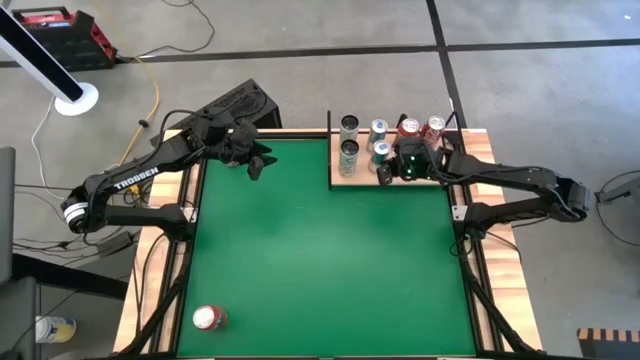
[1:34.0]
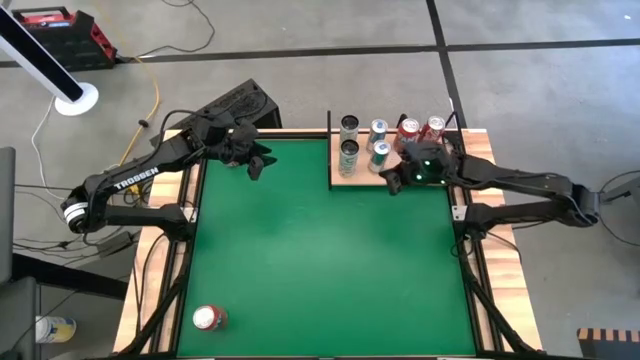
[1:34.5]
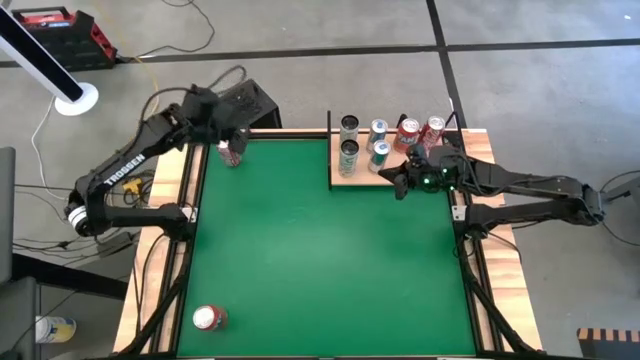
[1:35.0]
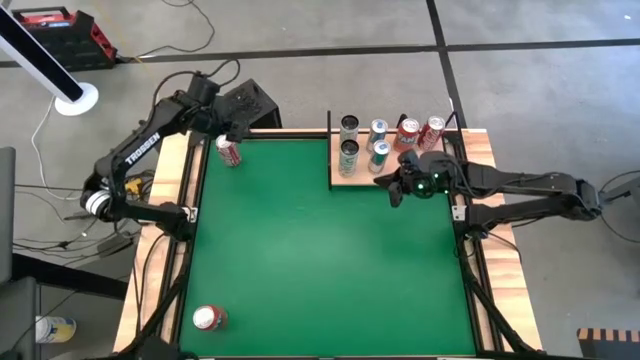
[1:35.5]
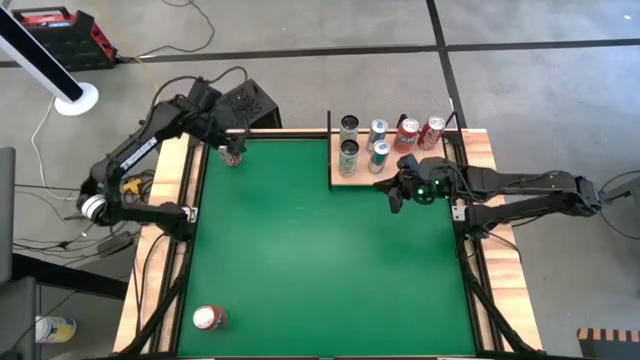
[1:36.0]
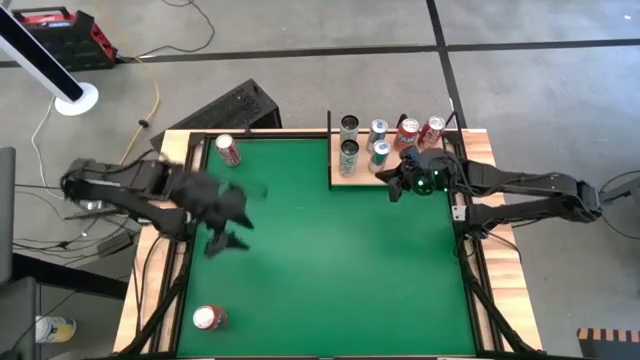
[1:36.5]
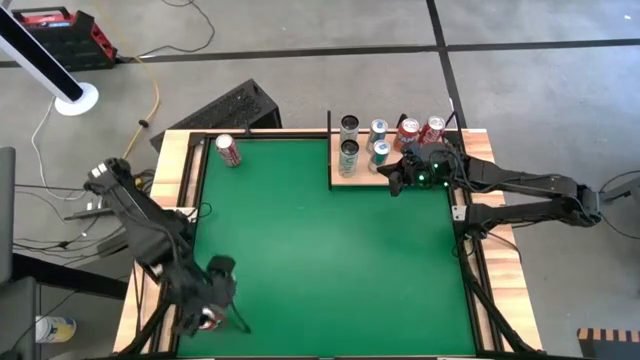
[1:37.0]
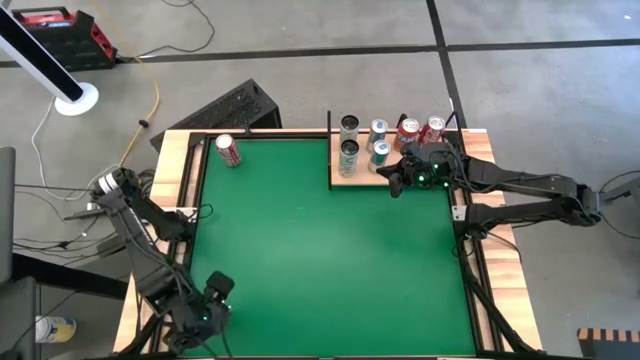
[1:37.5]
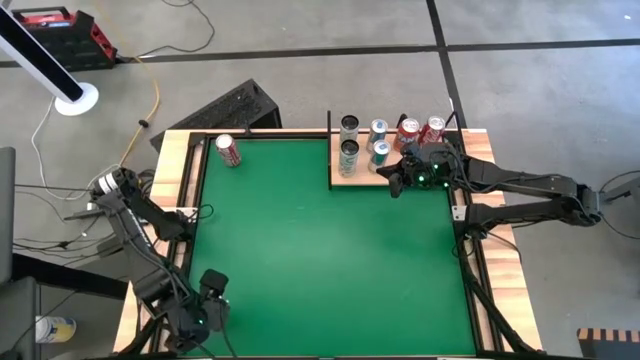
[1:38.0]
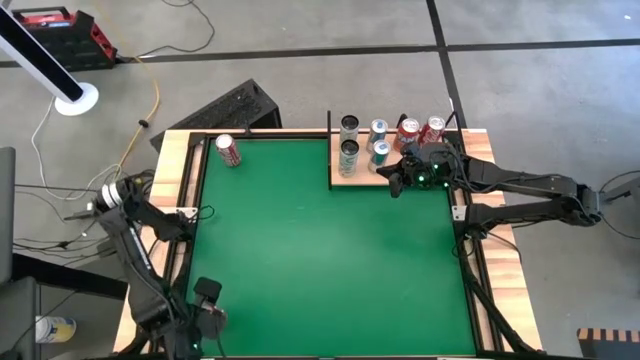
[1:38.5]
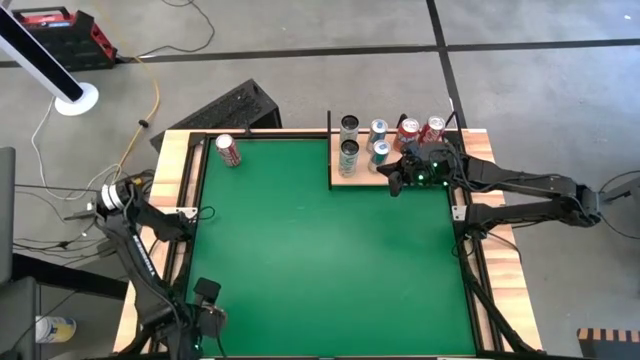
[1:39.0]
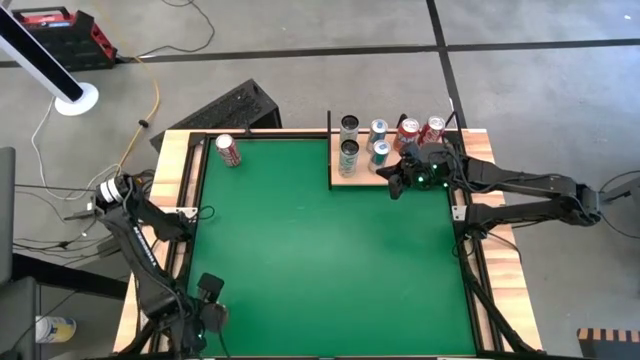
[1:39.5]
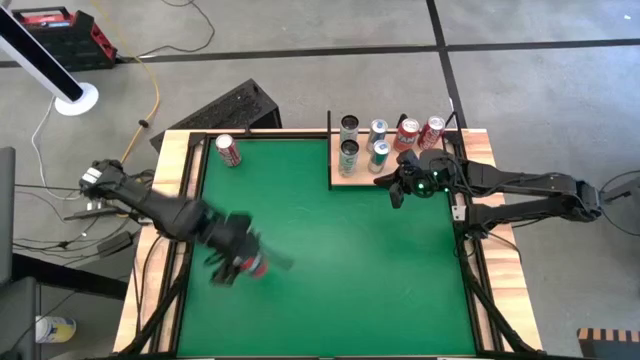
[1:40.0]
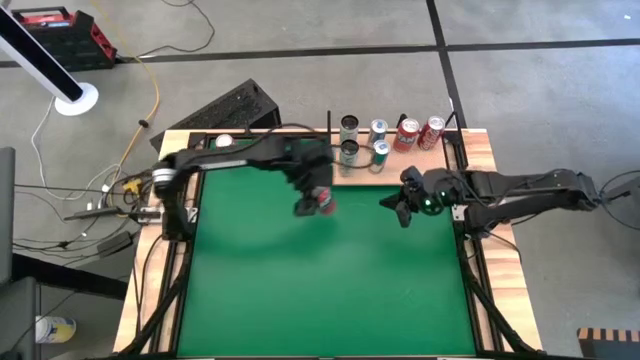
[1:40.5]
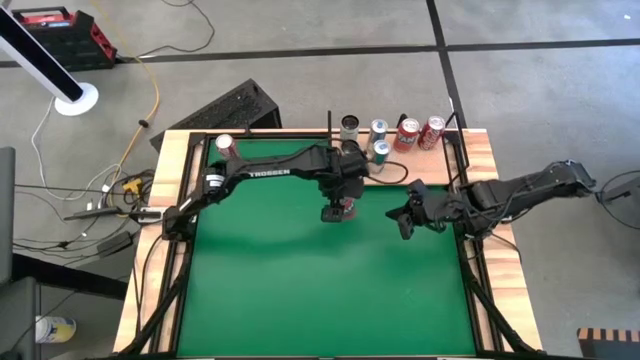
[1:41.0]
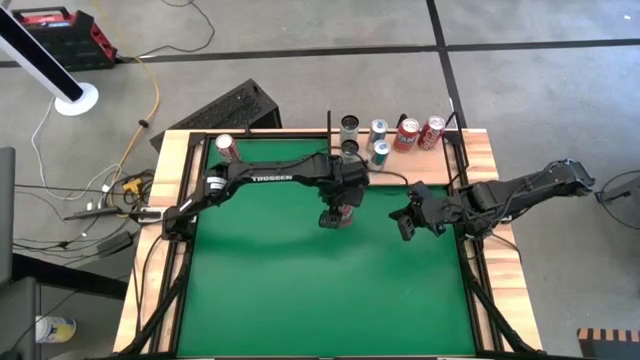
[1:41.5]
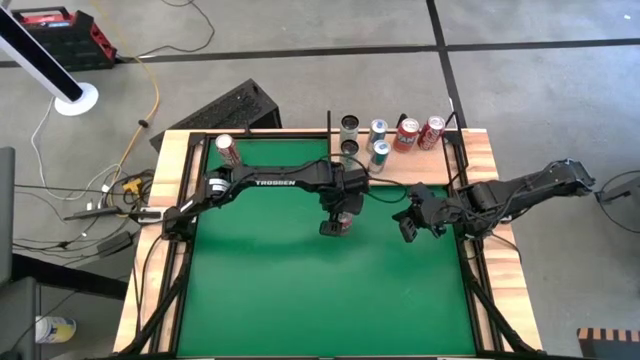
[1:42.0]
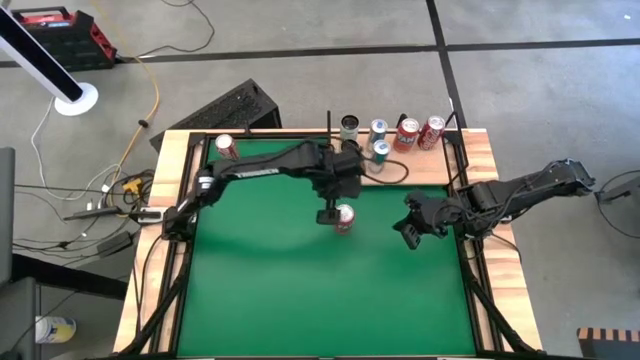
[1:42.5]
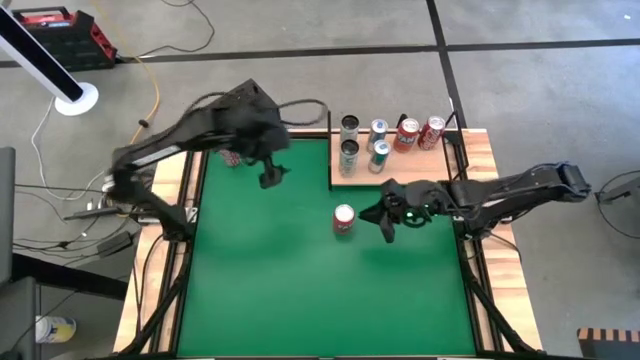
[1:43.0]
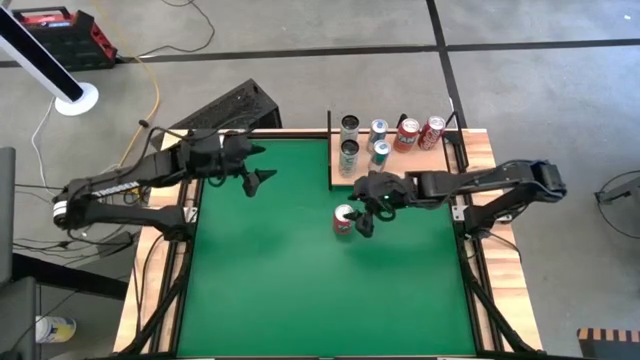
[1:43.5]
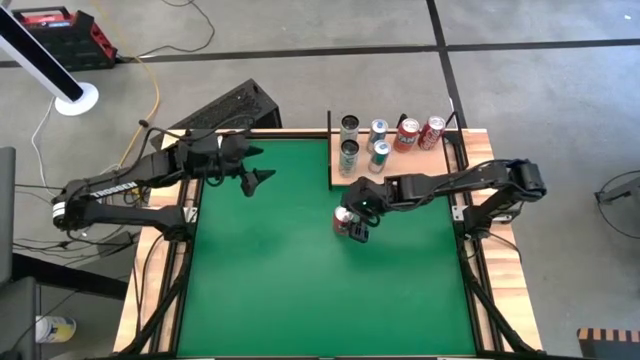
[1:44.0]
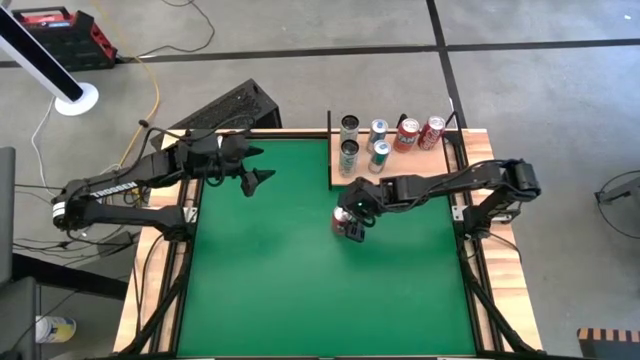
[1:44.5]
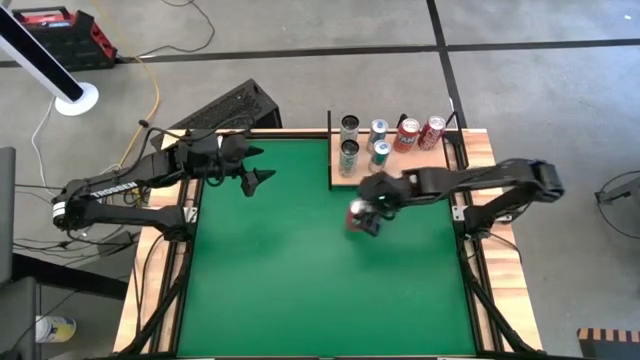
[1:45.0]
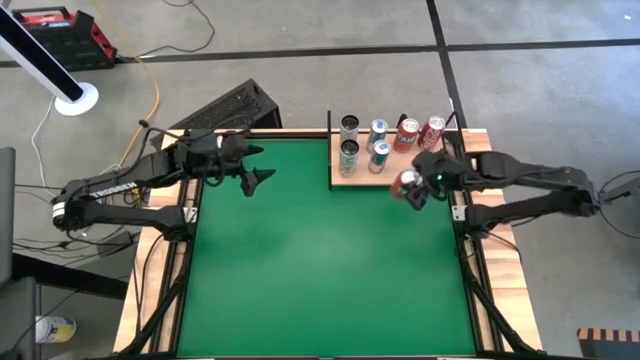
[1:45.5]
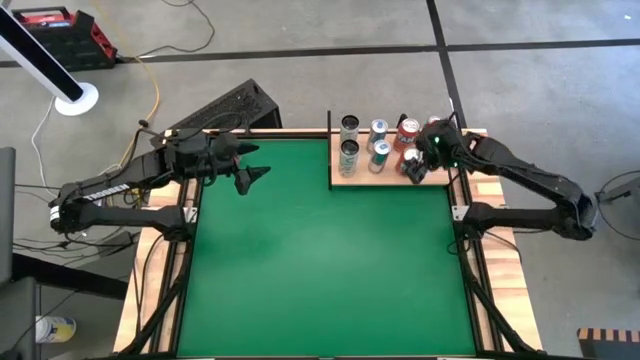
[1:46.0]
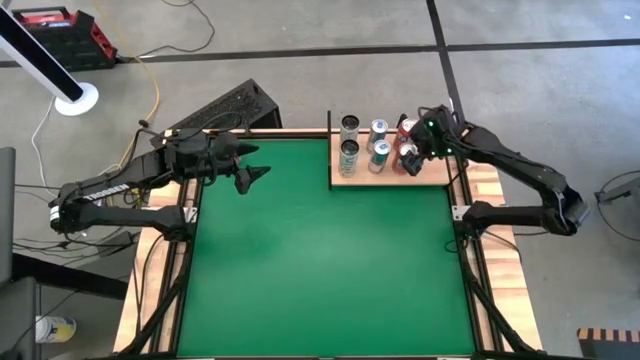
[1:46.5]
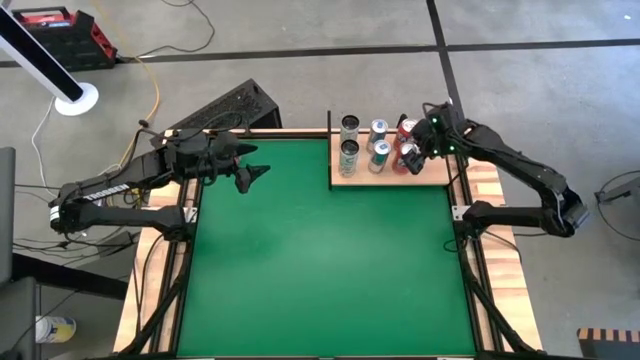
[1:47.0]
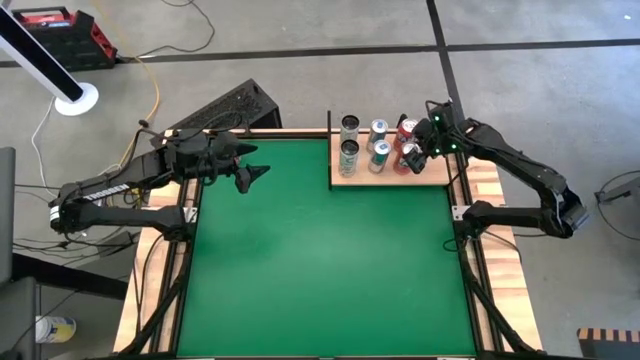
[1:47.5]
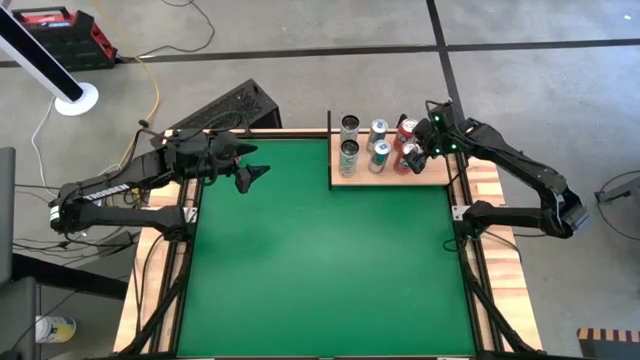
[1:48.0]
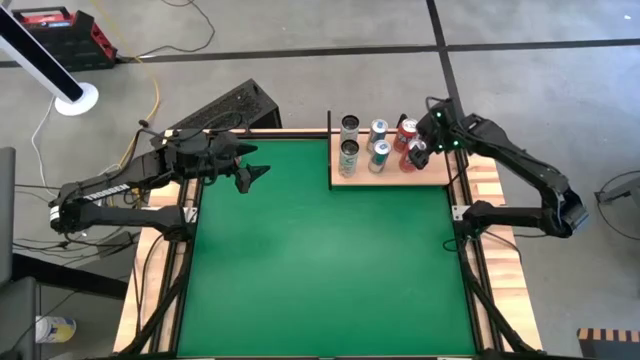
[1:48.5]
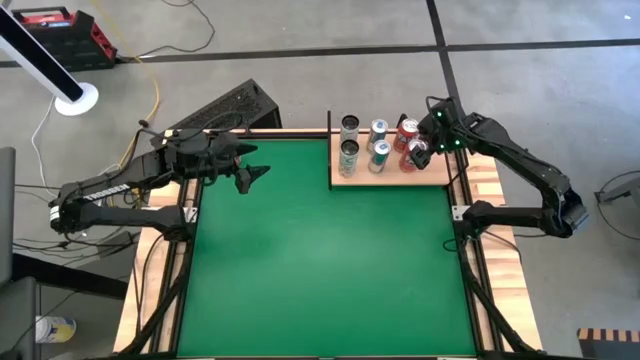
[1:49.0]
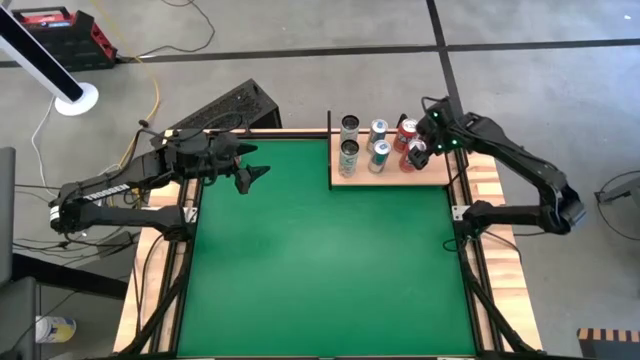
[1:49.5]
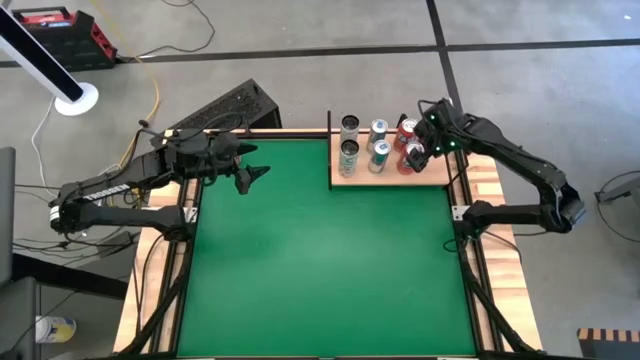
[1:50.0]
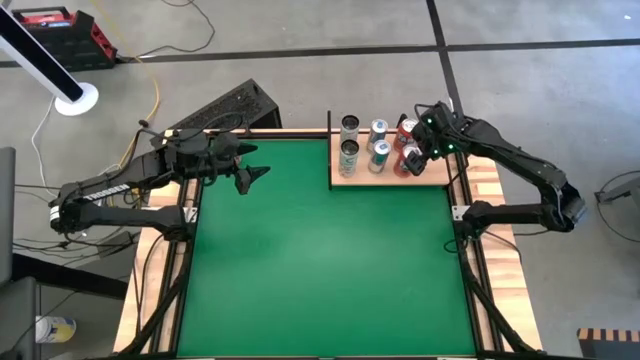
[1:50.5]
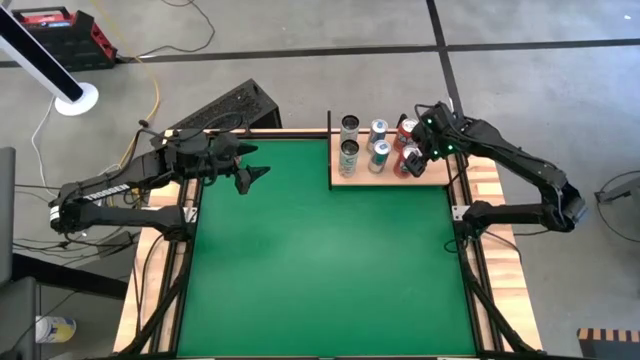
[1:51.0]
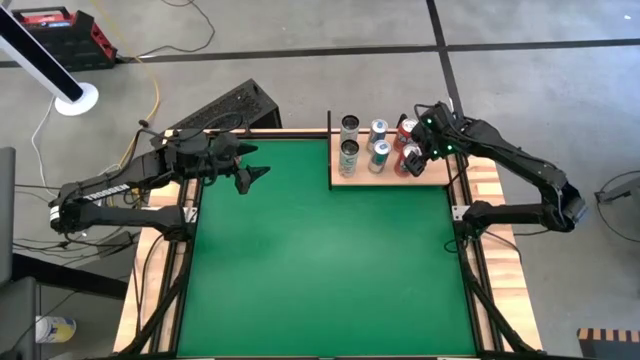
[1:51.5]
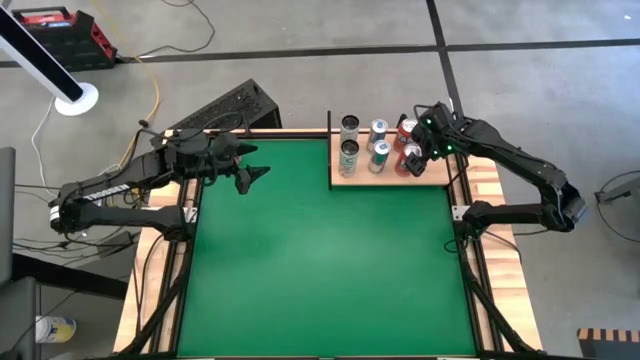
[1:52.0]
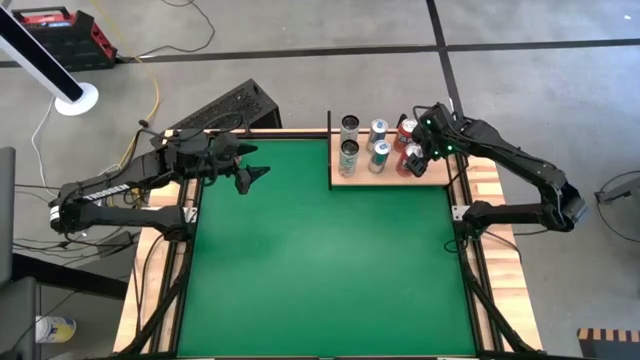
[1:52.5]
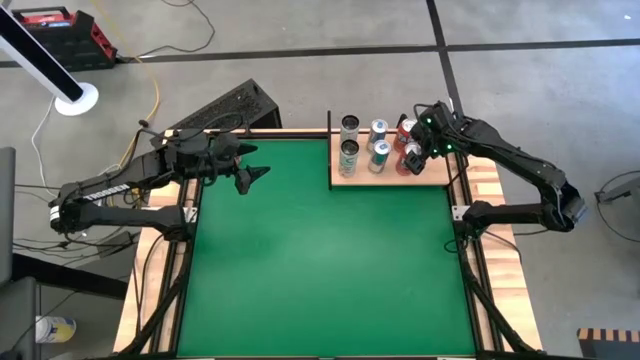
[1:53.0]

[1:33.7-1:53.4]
Task: Place canned beverage on shelf
Put the orange soda can on the shelf aligned with the other orange soda can
